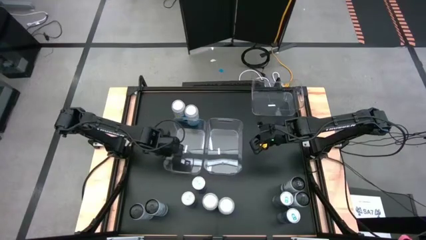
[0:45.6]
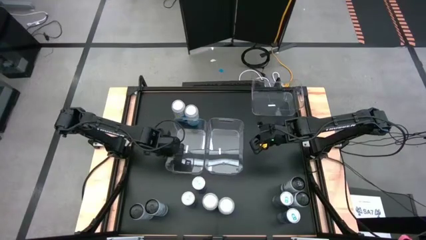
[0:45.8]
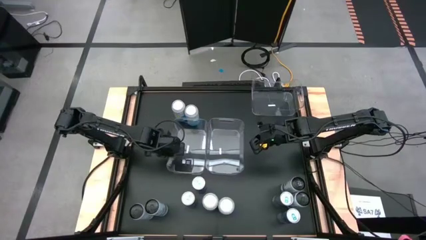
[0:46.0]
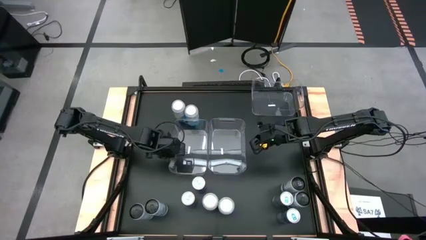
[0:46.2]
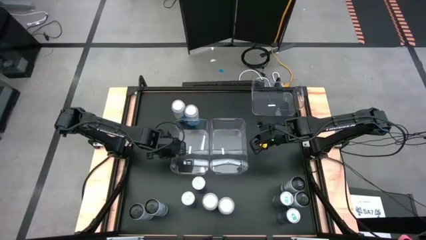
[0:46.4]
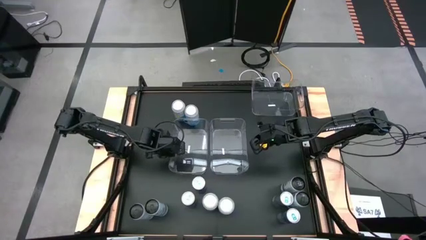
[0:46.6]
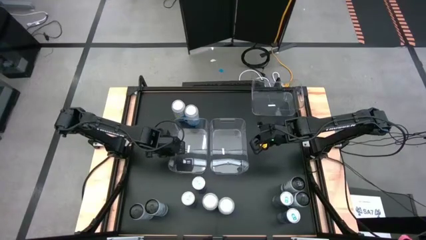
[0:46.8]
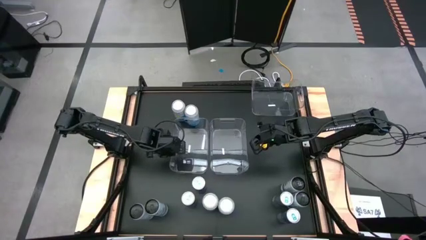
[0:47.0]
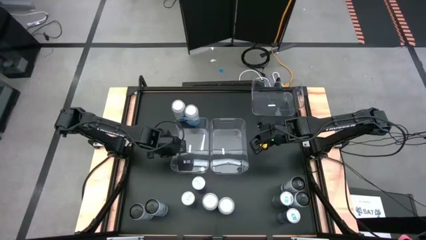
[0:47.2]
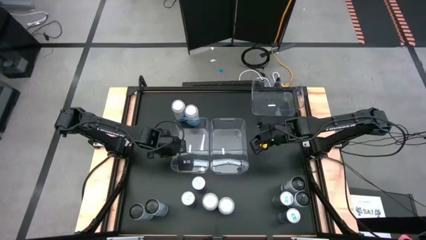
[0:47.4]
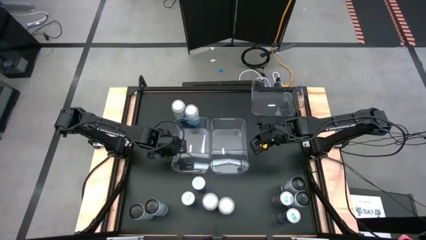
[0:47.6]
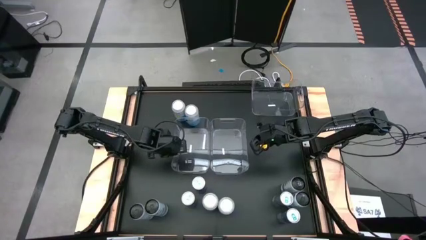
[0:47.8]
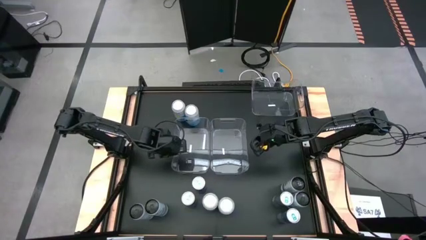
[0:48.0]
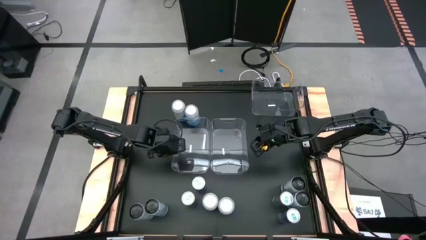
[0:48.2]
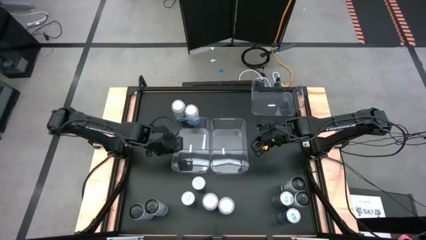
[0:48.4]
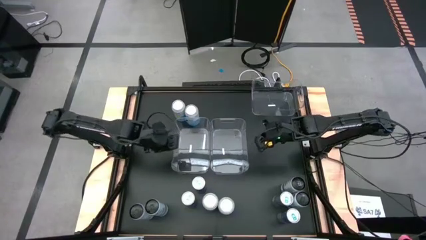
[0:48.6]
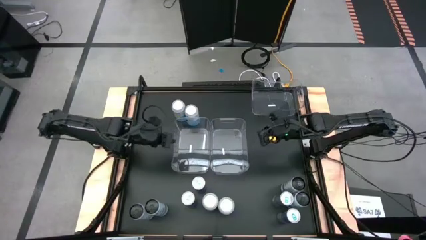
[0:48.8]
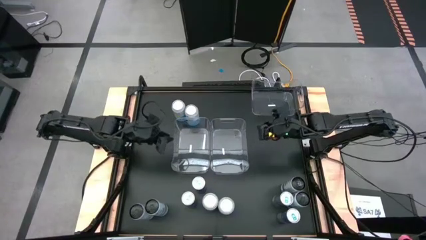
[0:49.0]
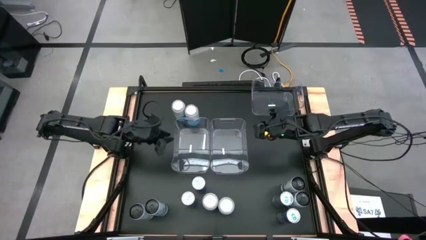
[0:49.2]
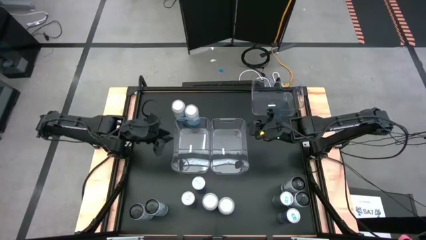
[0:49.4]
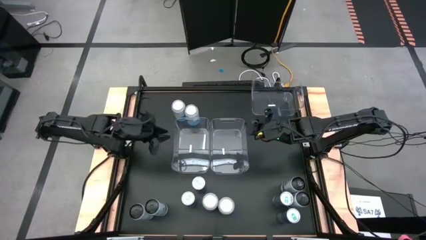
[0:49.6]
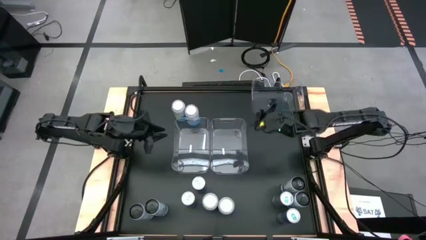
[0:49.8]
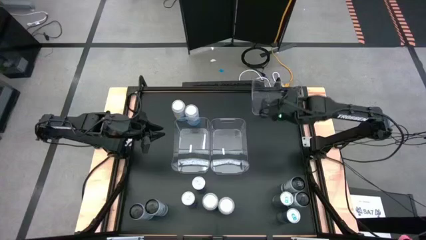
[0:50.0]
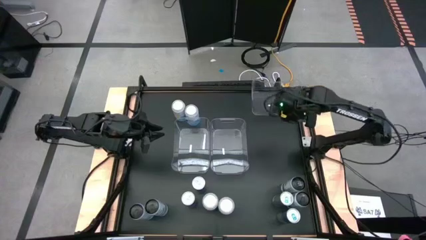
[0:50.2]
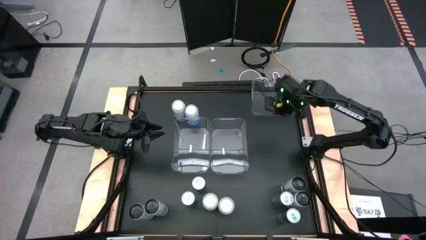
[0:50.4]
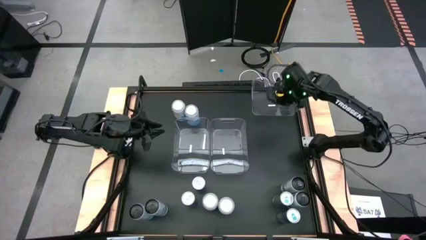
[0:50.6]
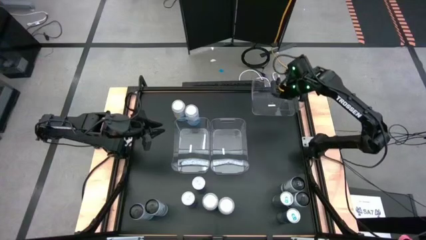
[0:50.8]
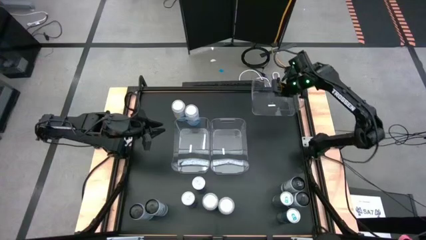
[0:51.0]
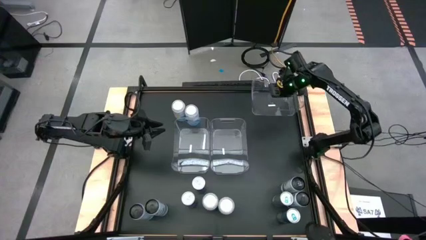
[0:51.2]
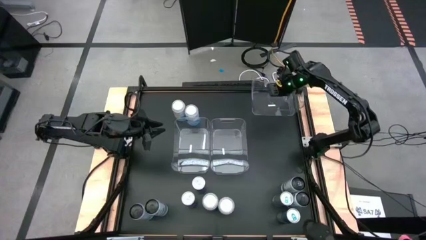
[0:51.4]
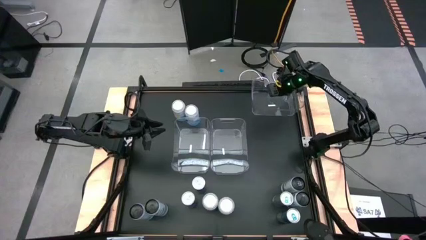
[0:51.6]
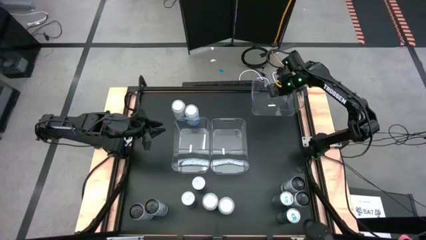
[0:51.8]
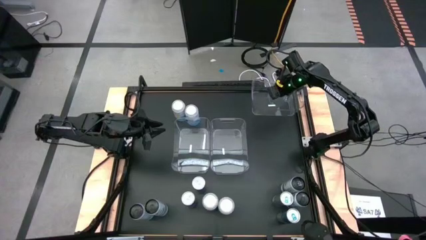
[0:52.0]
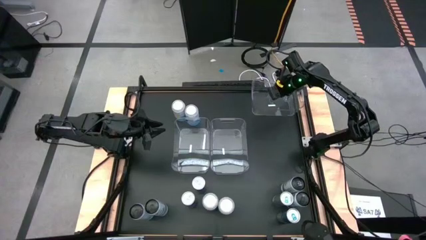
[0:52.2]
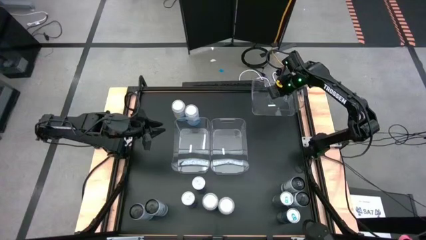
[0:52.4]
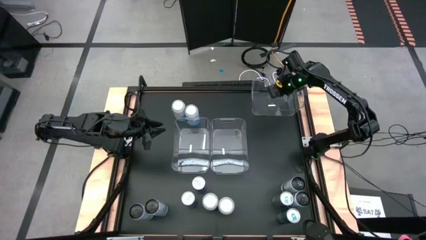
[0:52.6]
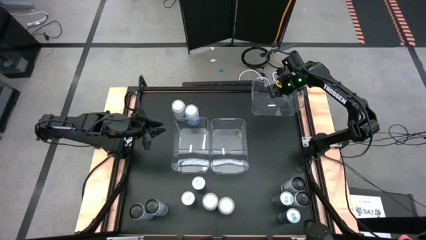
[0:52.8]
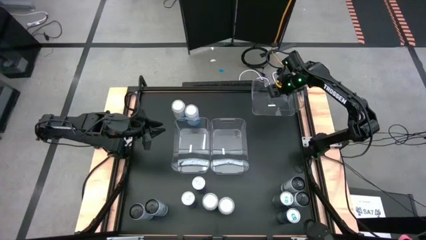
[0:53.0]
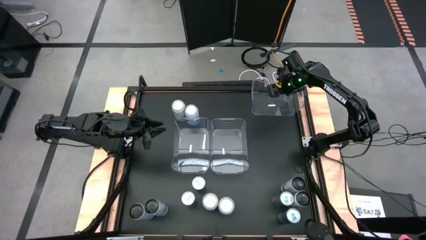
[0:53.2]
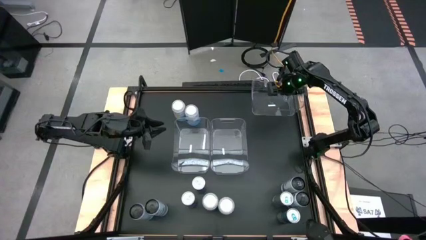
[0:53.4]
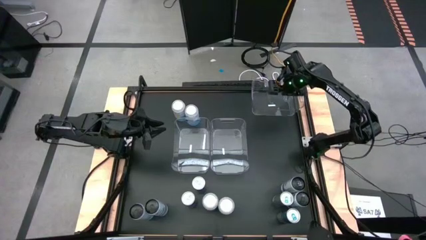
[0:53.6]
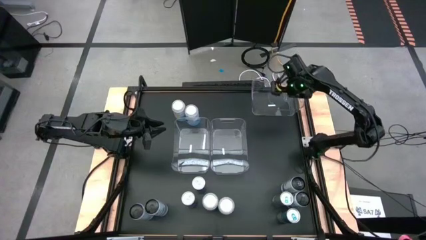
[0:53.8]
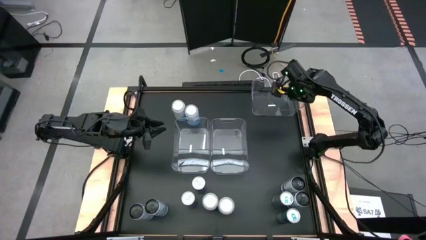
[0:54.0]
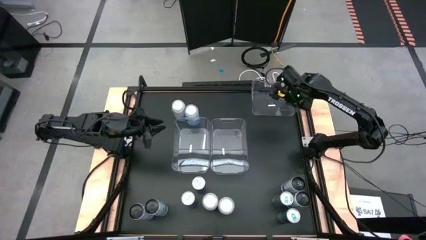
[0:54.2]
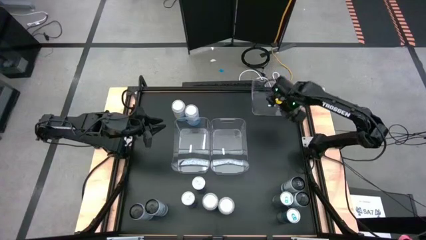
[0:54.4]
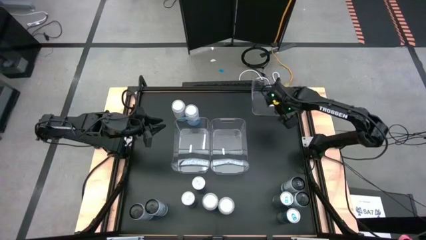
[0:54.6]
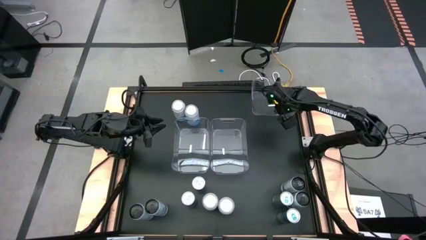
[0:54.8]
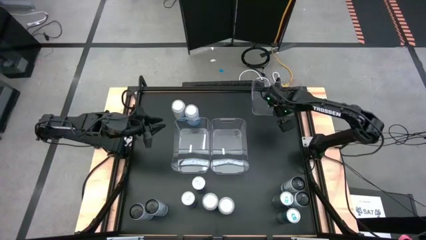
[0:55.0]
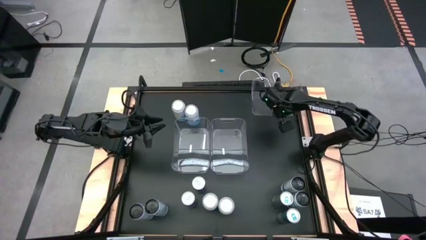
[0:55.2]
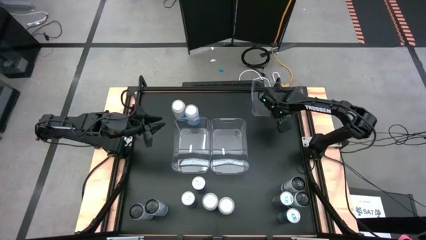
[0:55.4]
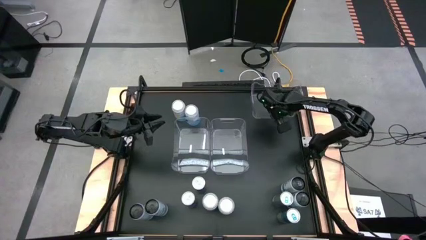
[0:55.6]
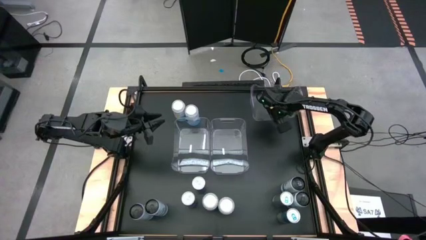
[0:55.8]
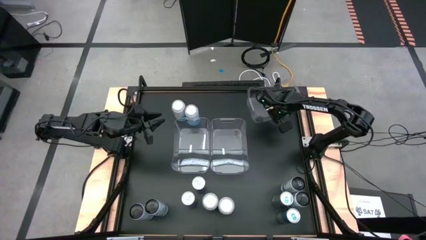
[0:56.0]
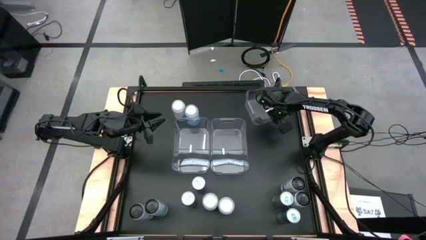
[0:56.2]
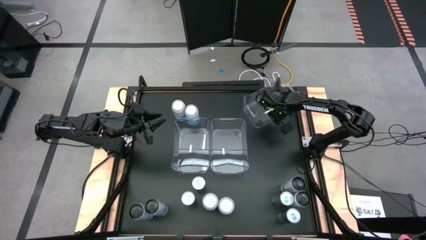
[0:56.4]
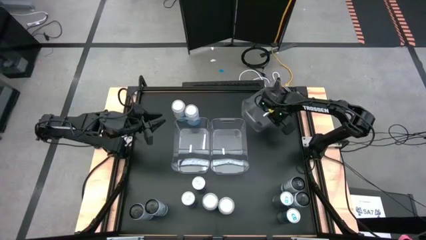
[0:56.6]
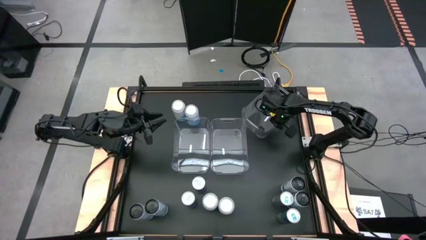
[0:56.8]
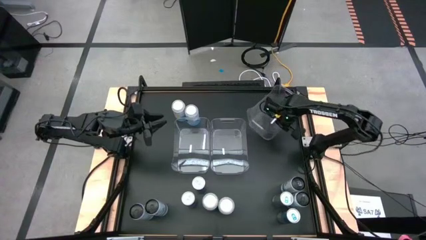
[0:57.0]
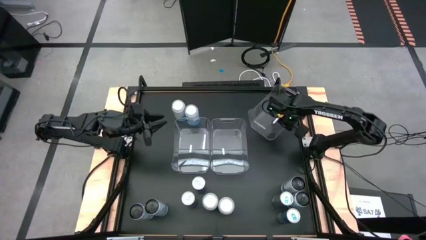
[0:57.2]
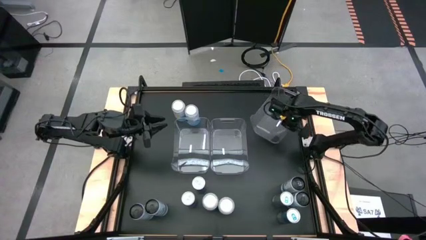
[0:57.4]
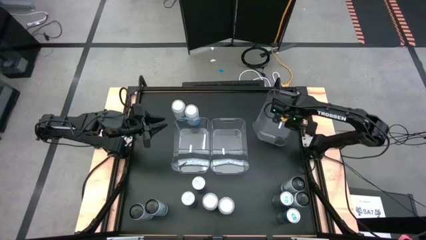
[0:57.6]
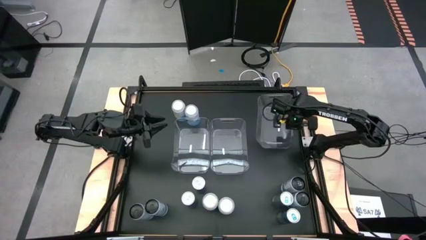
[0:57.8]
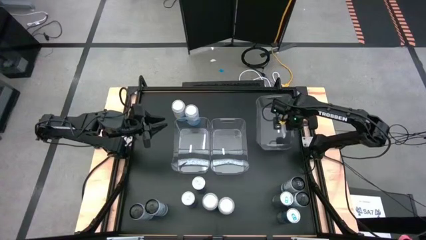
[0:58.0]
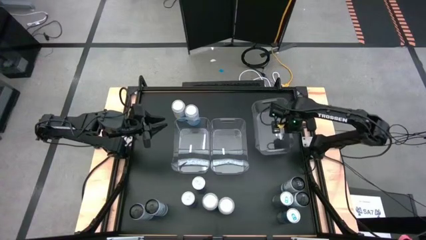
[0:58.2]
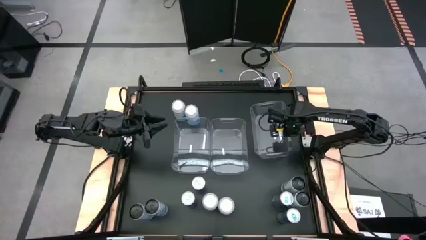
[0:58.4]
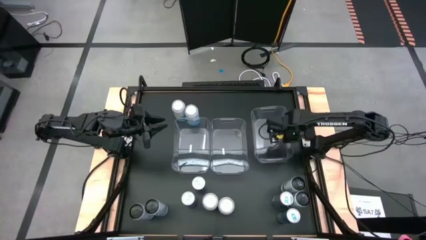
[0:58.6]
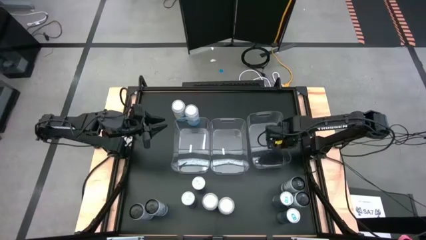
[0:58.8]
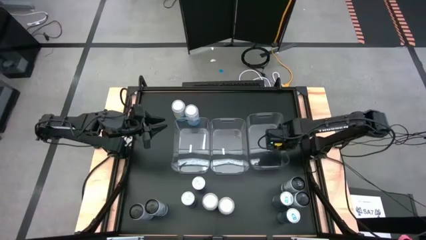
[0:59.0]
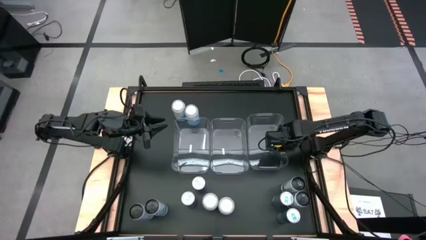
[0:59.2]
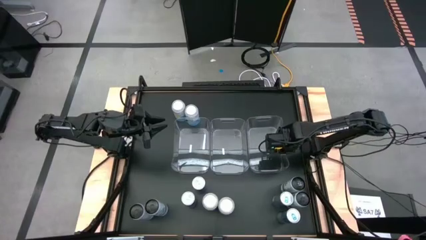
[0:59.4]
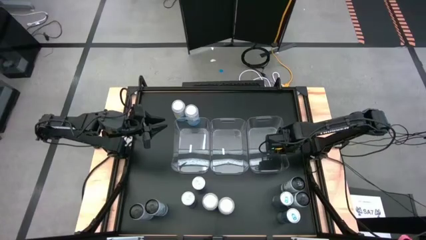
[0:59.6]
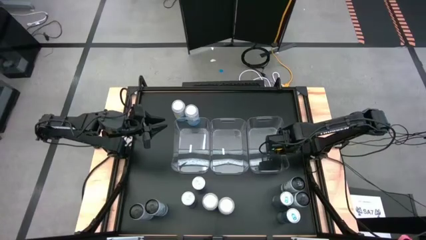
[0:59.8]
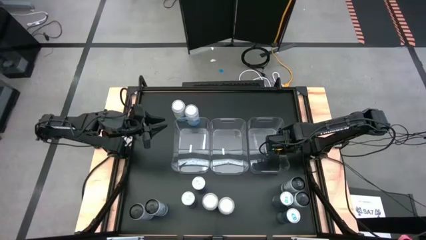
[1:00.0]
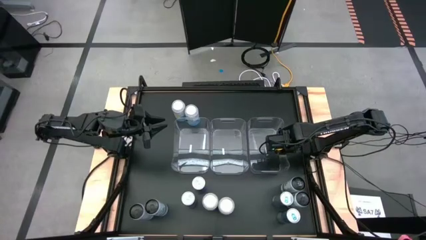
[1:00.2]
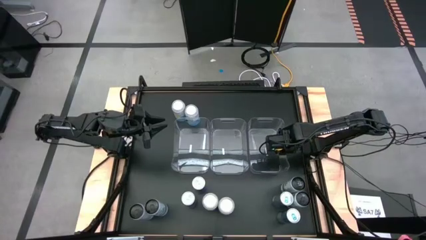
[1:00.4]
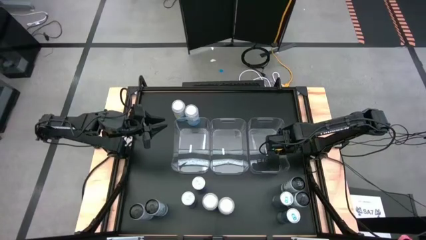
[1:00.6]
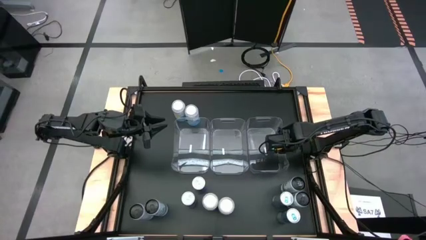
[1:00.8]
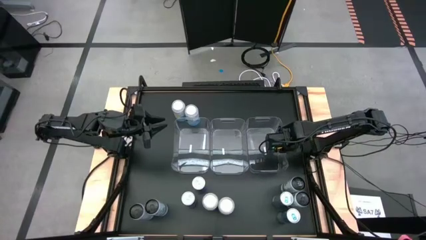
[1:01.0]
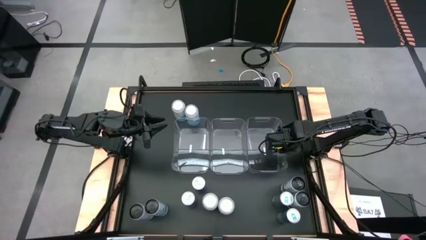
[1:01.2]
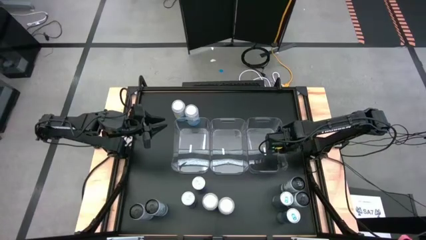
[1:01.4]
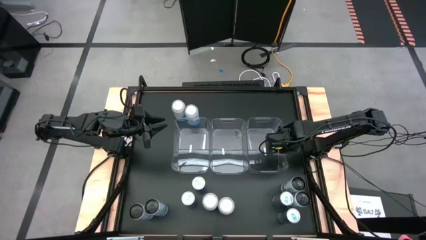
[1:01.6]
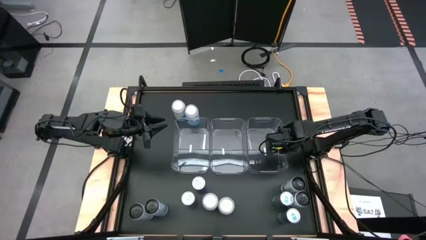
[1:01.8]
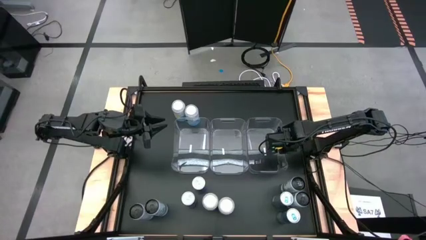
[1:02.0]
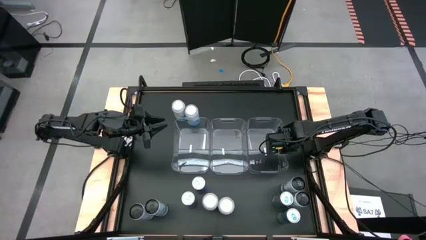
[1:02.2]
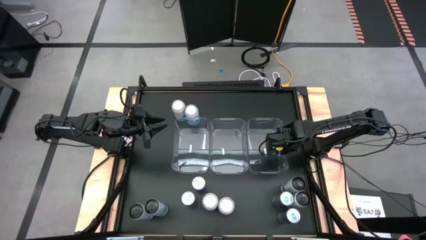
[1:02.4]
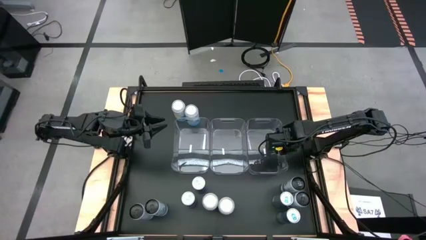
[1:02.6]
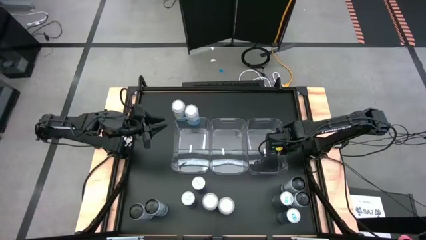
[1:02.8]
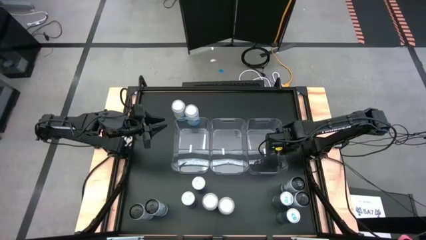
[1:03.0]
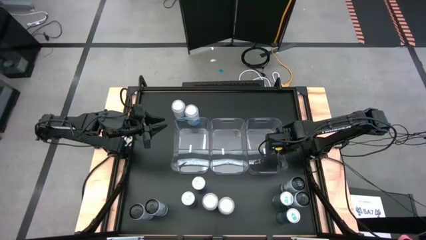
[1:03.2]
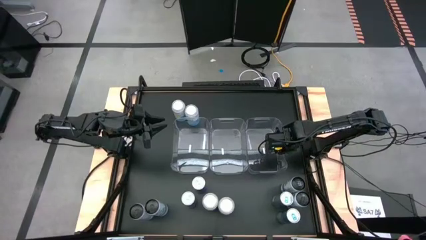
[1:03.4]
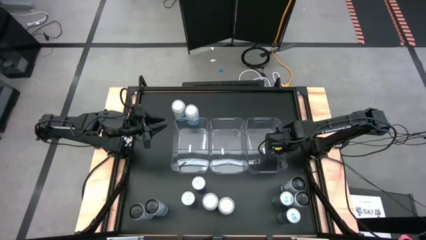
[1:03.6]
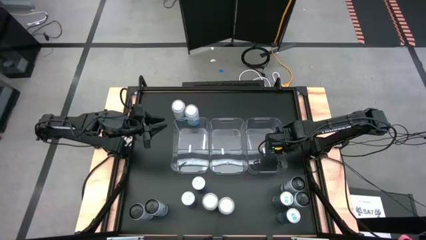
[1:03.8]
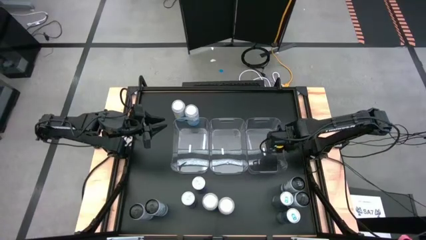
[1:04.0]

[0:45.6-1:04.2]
Task: Sort soda cans
Move the transparent bins to the center
